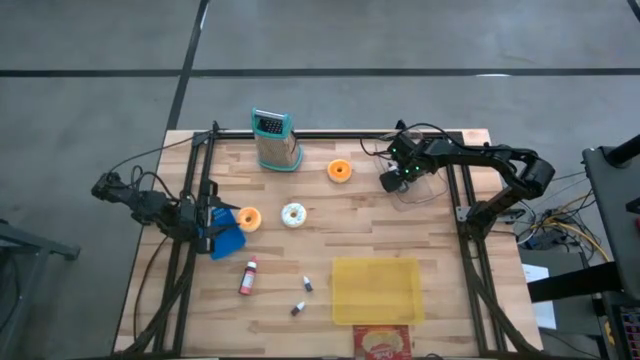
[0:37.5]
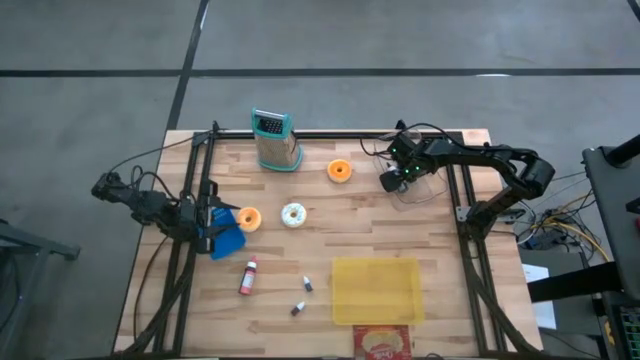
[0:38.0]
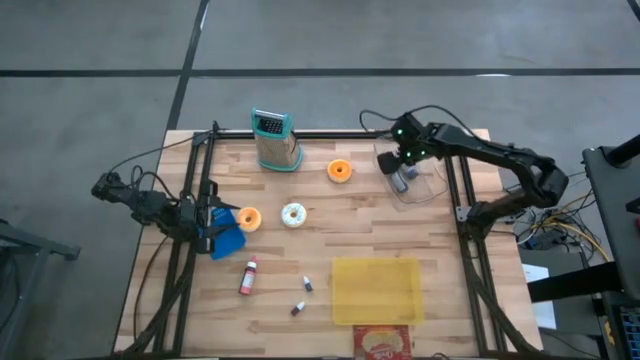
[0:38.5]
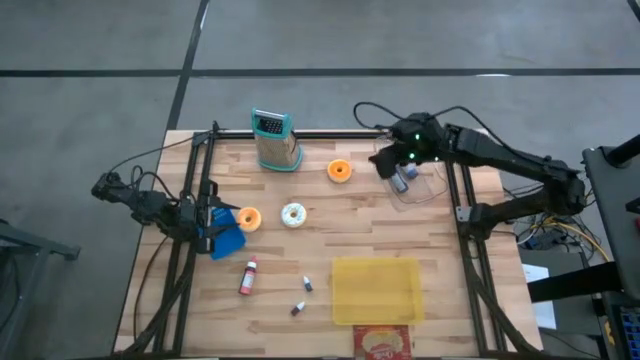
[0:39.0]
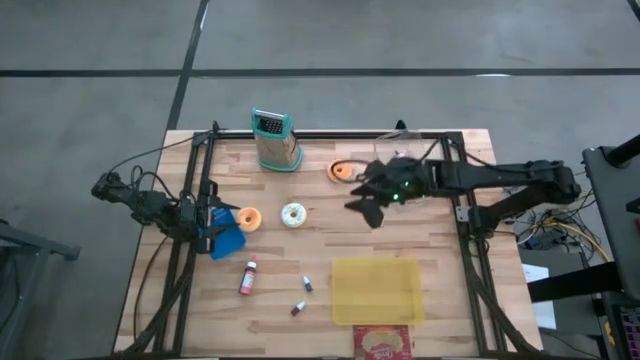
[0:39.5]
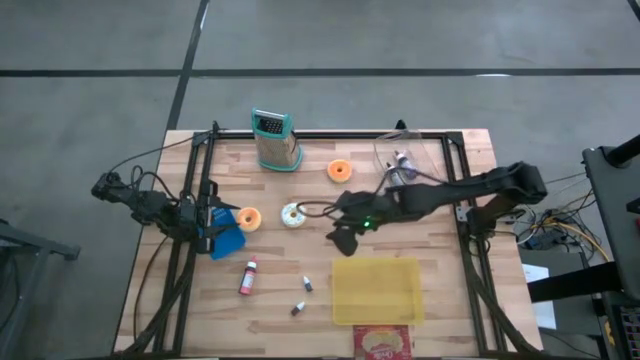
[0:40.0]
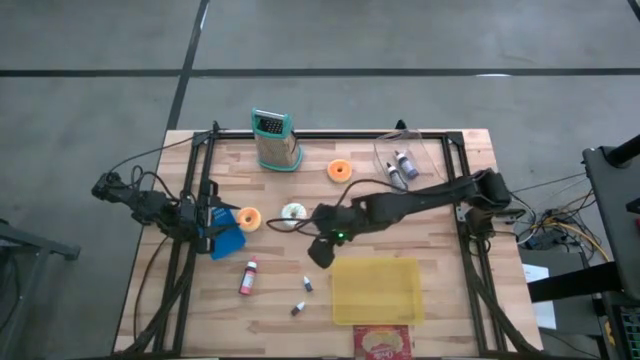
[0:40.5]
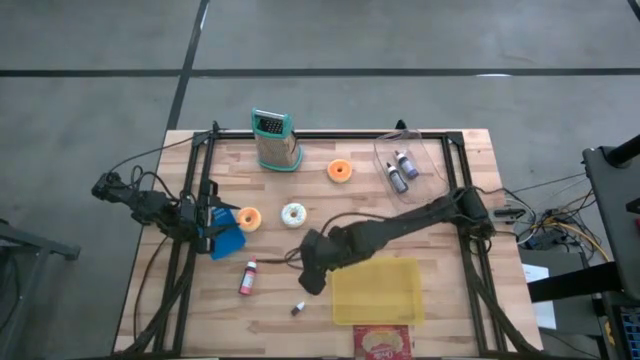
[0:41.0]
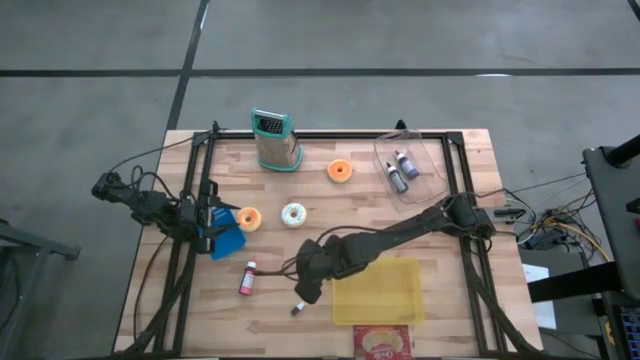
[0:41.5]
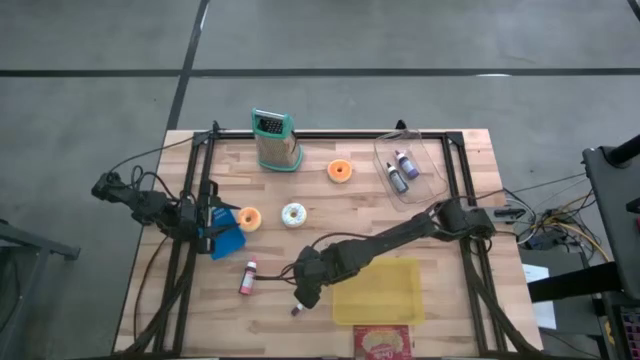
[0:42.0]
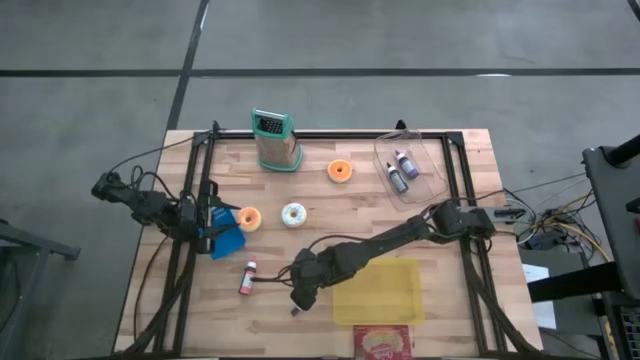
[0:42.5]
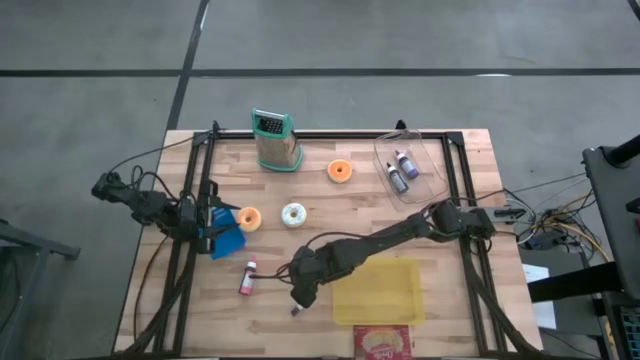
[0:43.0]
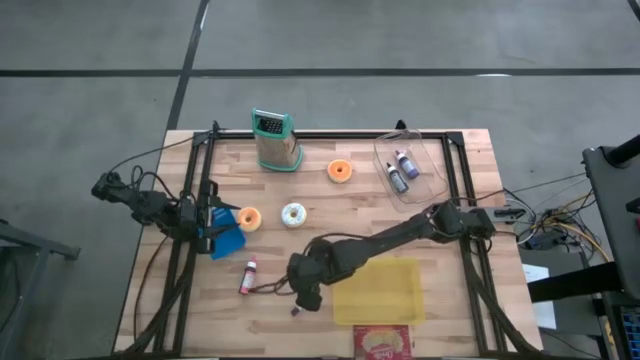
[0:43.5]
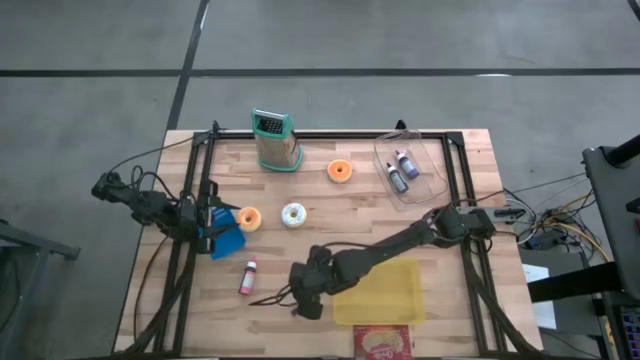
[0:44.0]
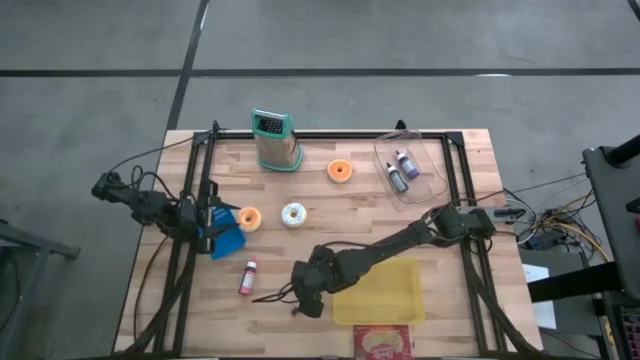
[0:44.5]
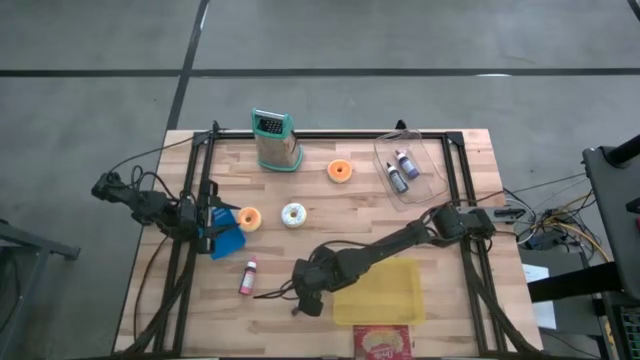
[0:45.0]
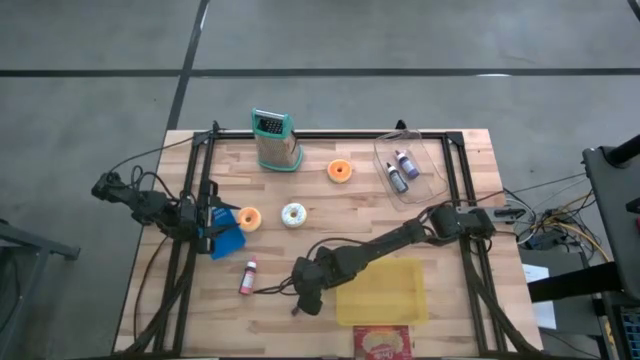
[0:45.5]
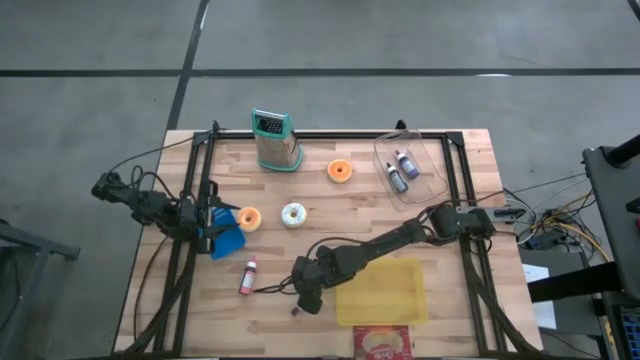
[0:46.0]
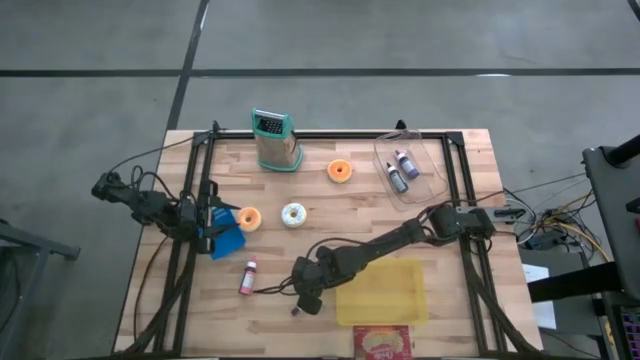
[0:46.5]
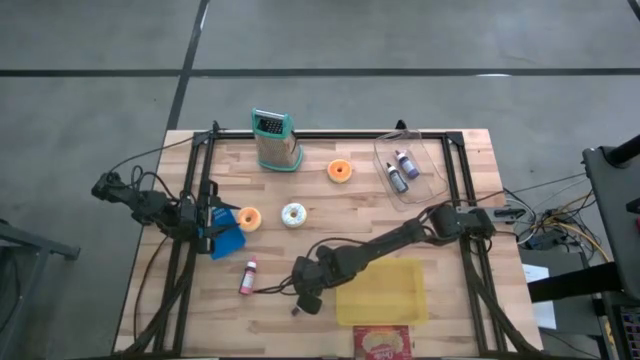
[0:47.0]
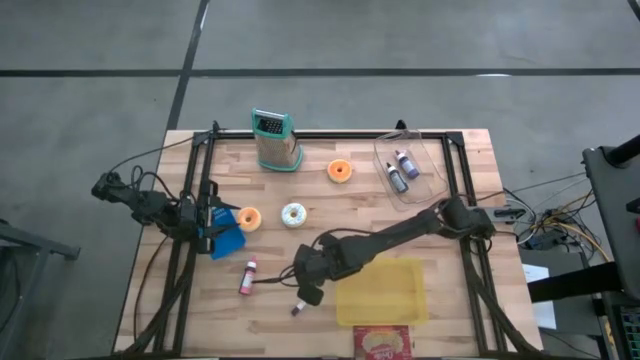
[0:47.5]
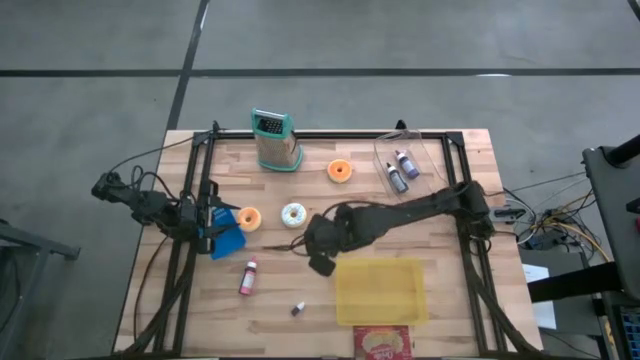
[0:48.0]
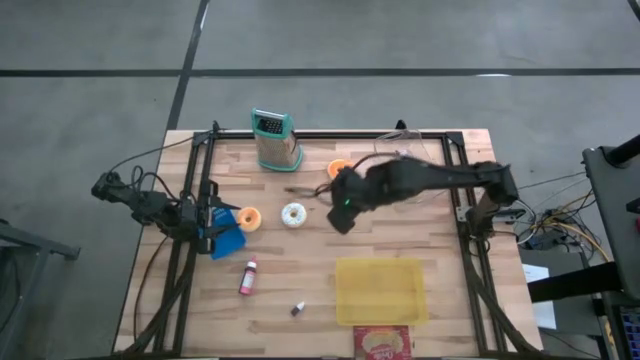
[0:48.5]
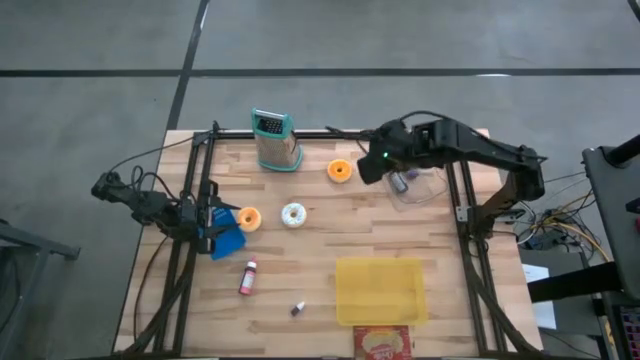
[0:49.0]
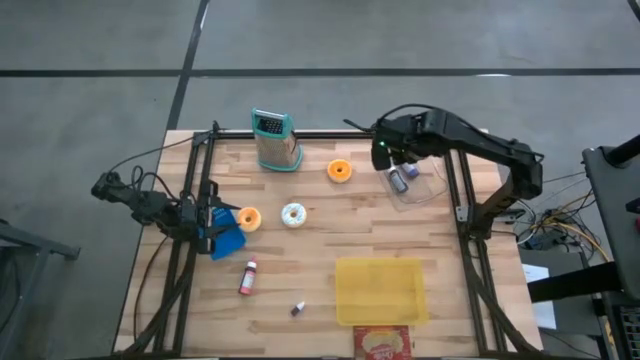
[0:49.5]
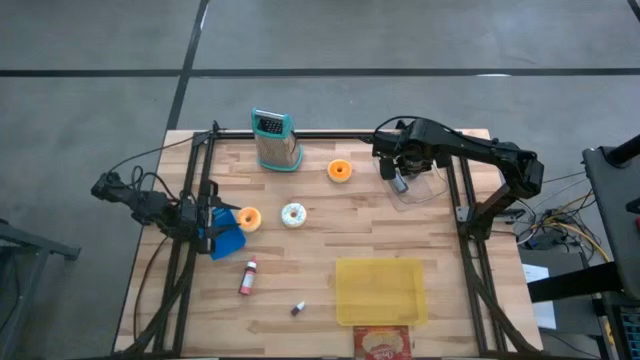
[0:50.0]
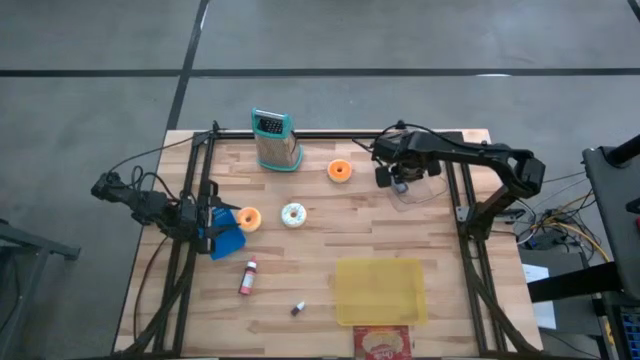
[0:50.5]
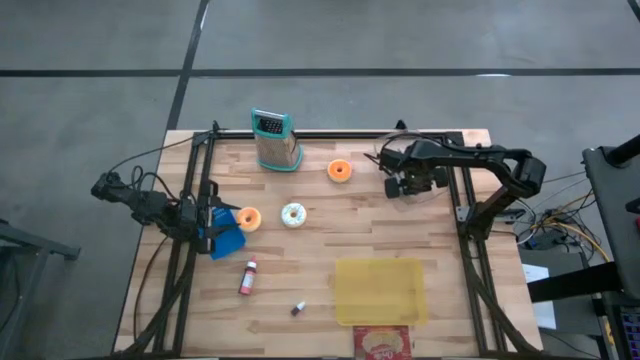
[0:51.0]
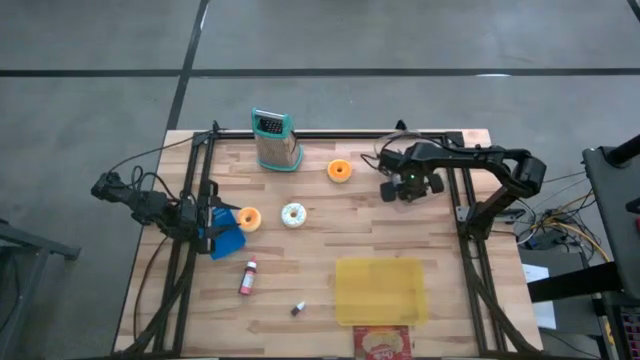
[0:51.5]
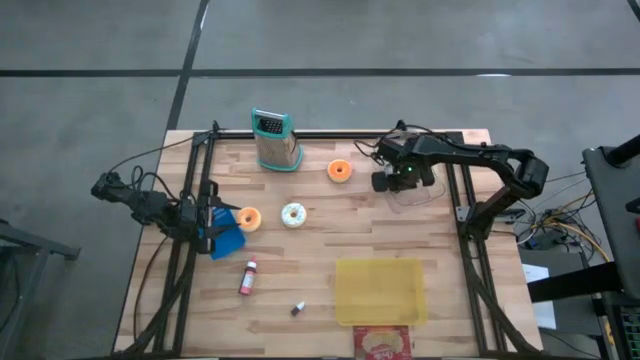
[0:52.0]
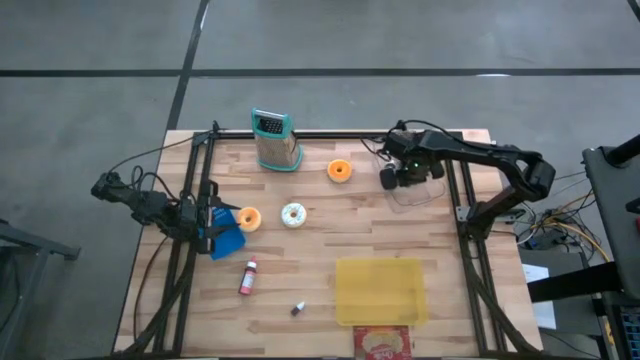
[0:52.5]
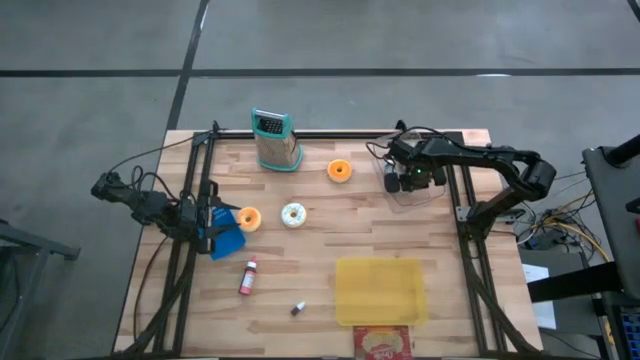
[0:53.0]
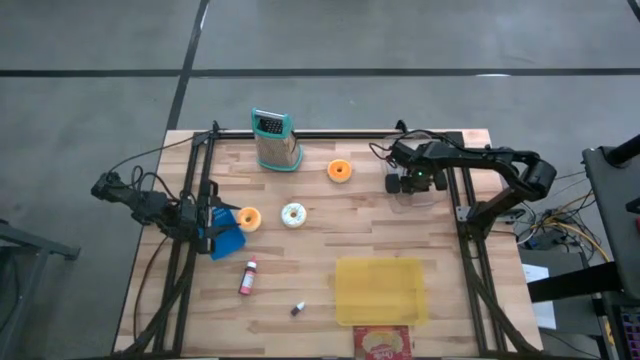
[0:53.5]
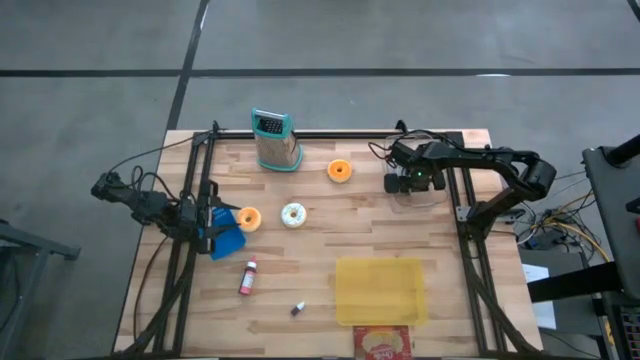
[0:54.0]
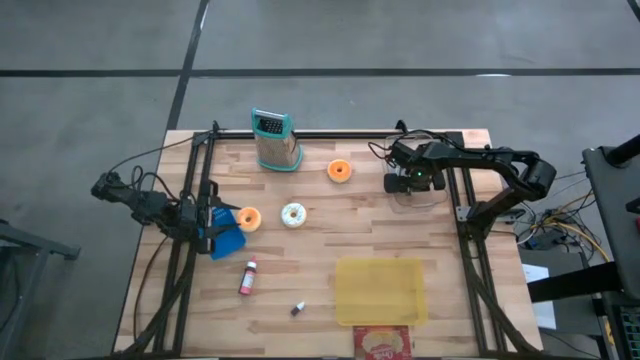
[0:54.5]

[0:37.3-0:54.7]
Task: Pick & Place Food Item
Put the dark blue food coloring bottle into the transparent bin

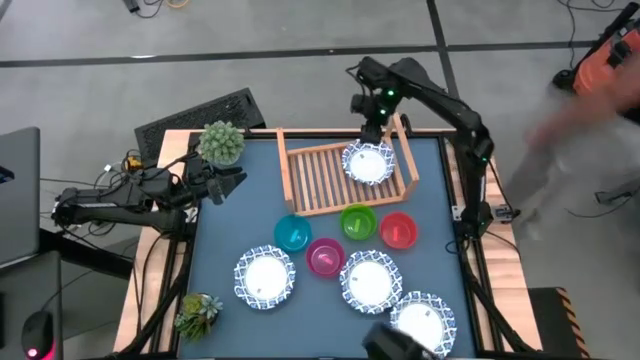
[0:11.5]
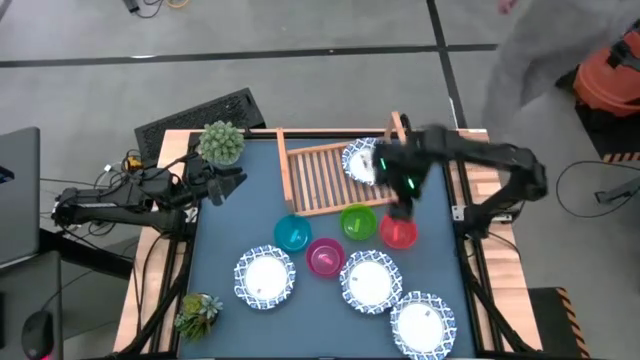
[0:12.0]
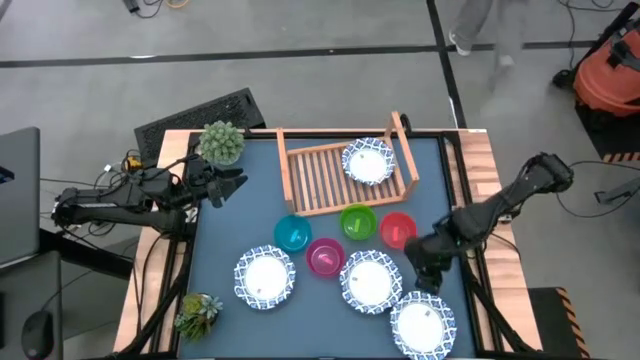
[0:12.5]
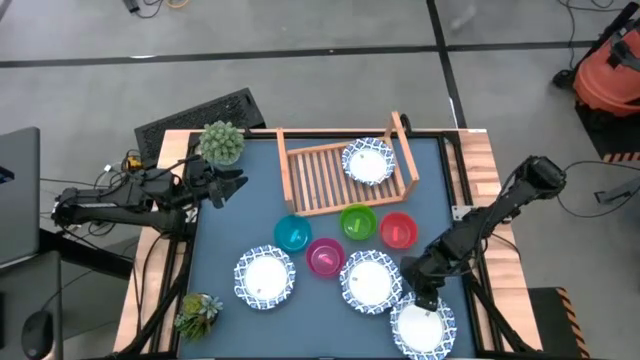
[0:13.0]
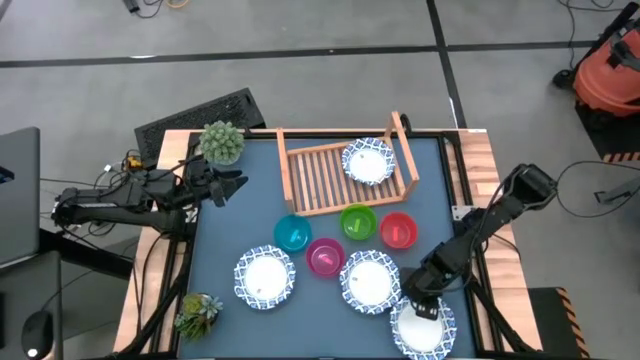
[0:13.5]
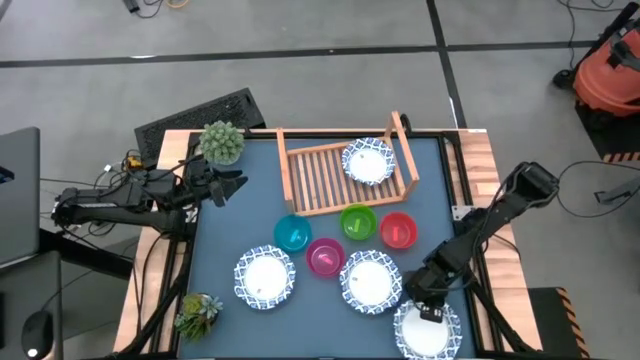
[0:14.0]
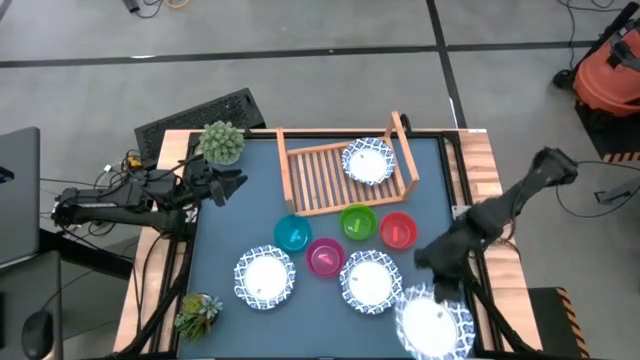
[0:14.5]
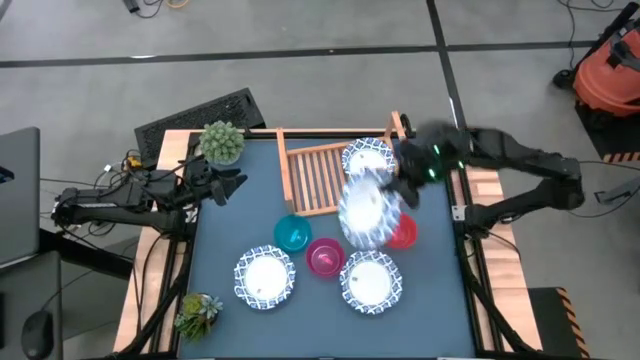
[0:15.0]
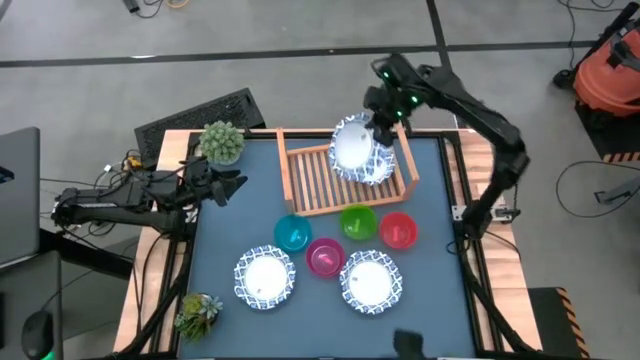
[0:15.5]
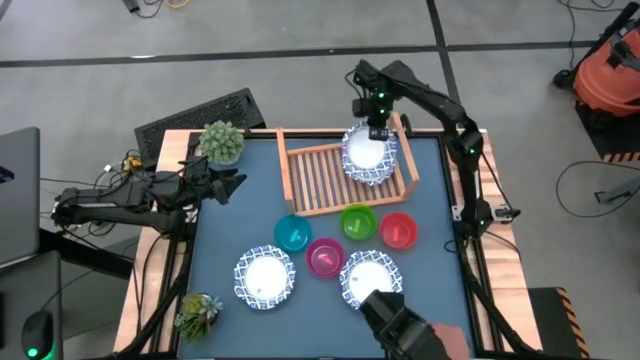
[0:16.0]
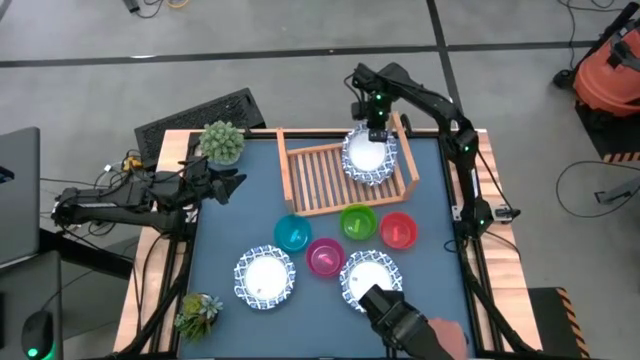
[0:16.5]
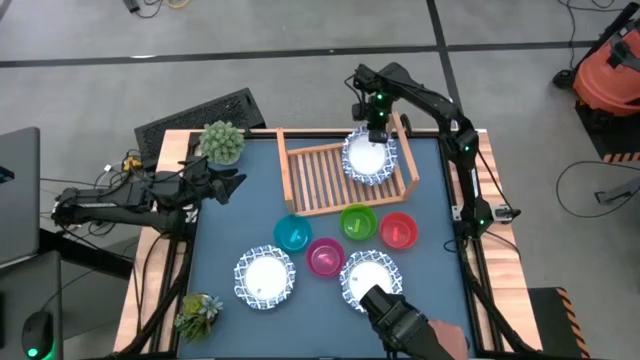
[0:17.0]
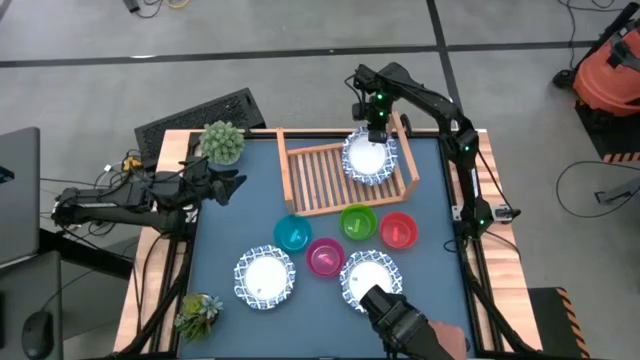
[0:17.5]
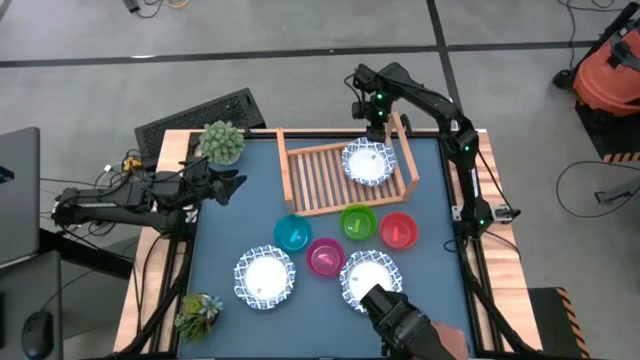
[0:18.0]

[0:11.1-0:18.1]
Task: Place and stack bowls onto a shelf
Stack the white bowl on top of the white bowl on the shelf
